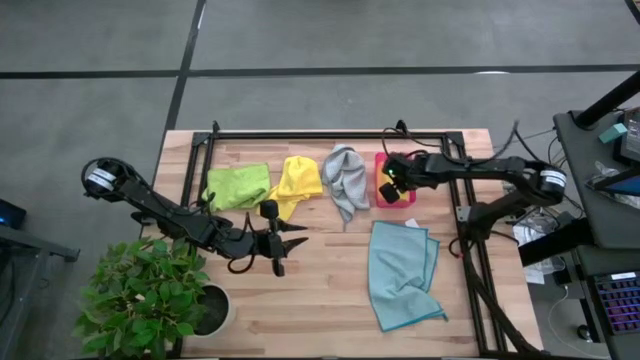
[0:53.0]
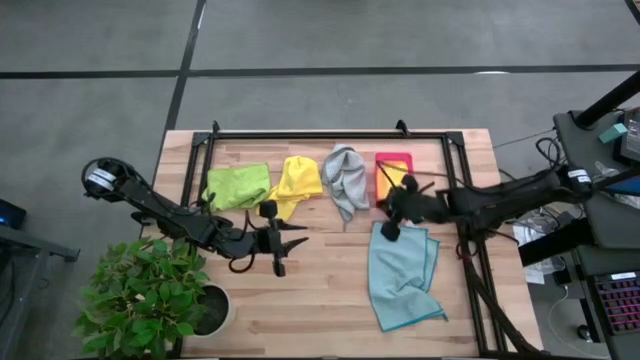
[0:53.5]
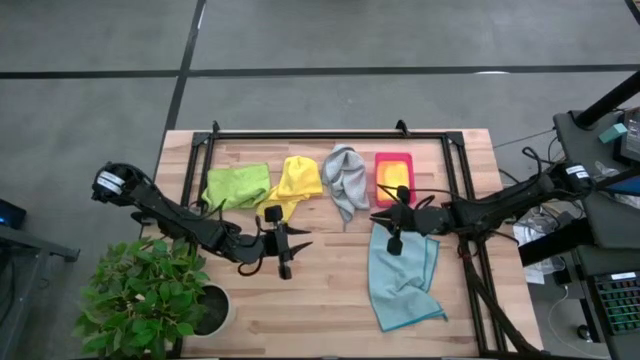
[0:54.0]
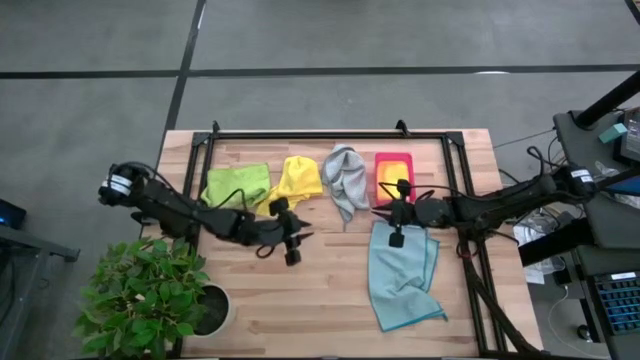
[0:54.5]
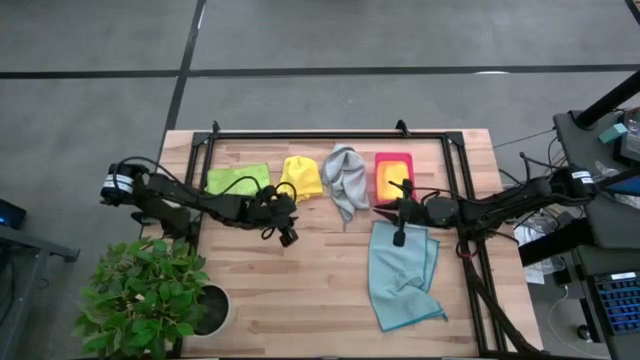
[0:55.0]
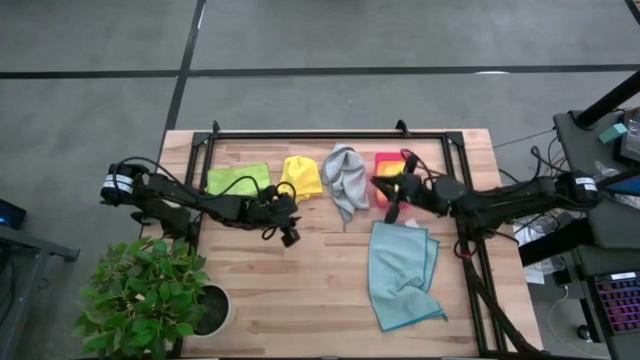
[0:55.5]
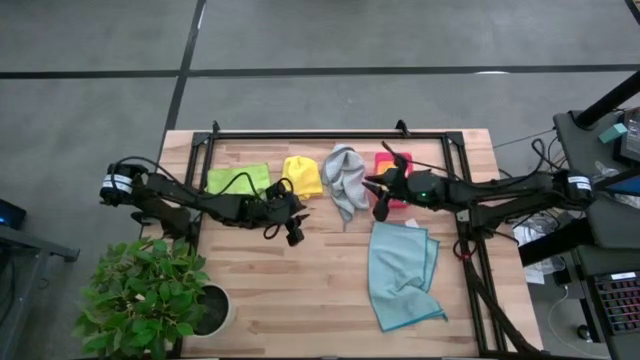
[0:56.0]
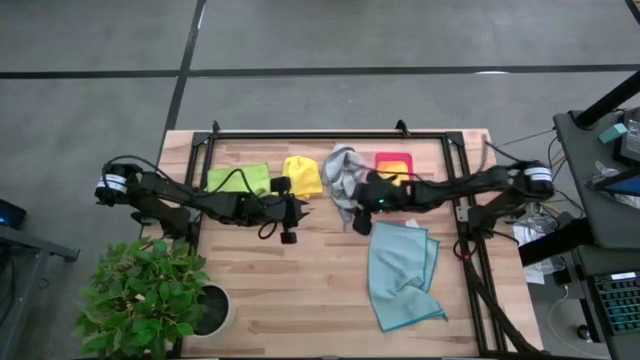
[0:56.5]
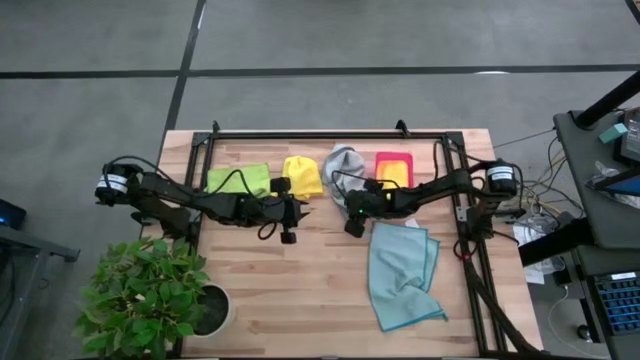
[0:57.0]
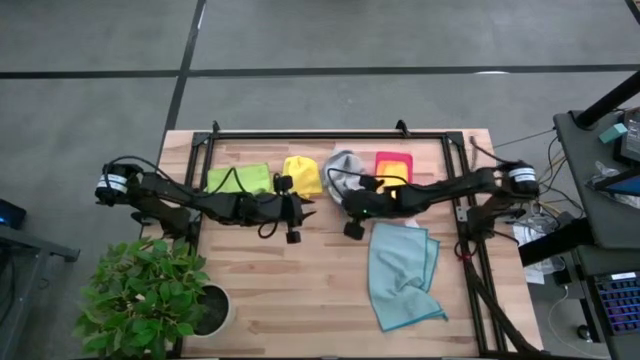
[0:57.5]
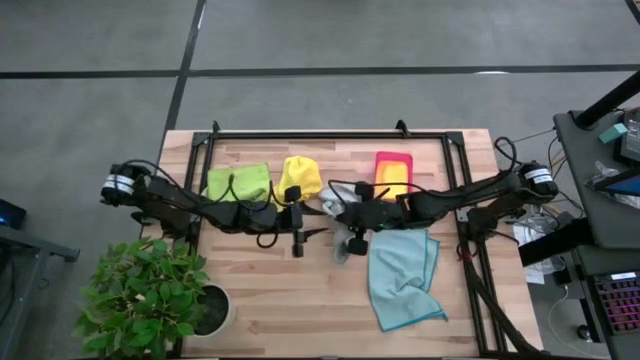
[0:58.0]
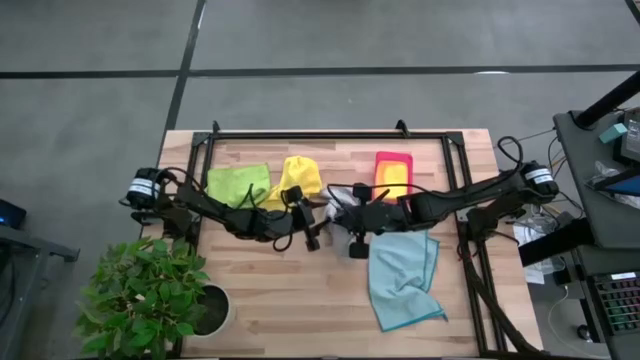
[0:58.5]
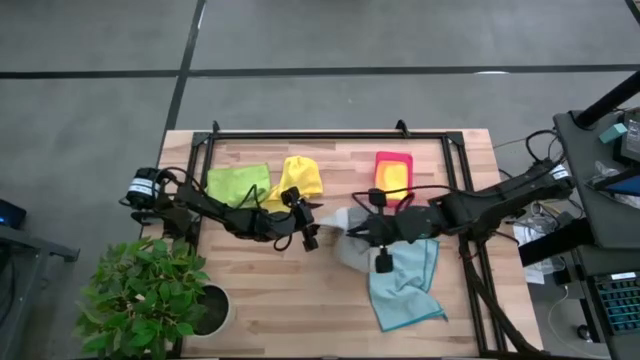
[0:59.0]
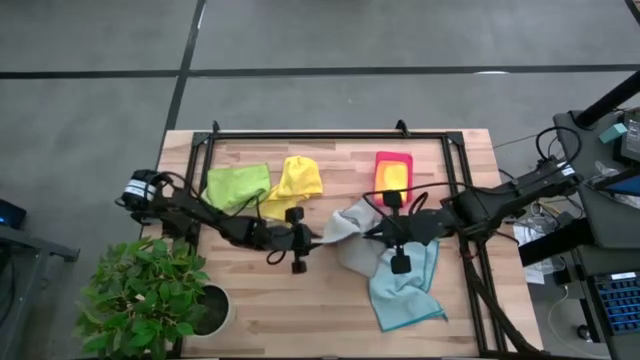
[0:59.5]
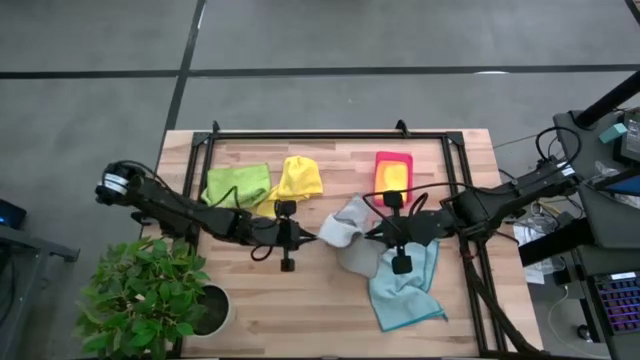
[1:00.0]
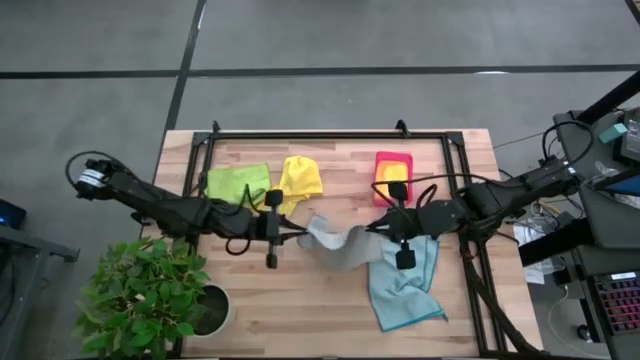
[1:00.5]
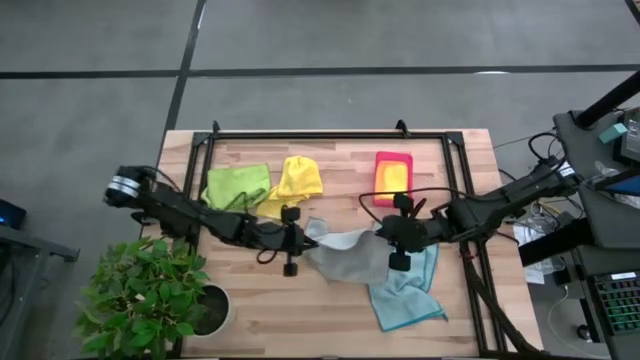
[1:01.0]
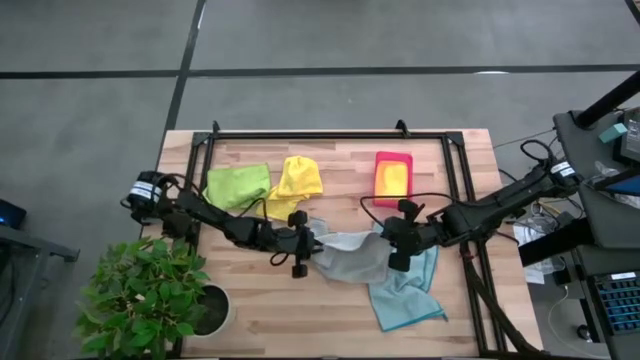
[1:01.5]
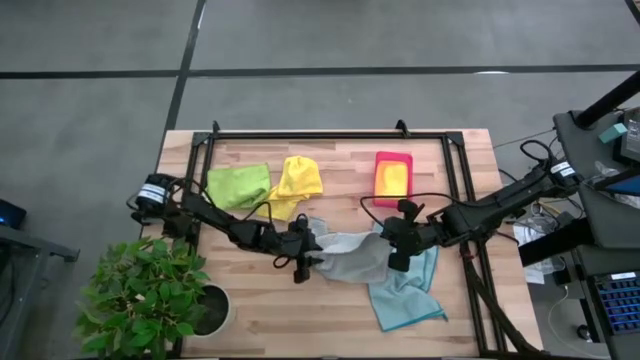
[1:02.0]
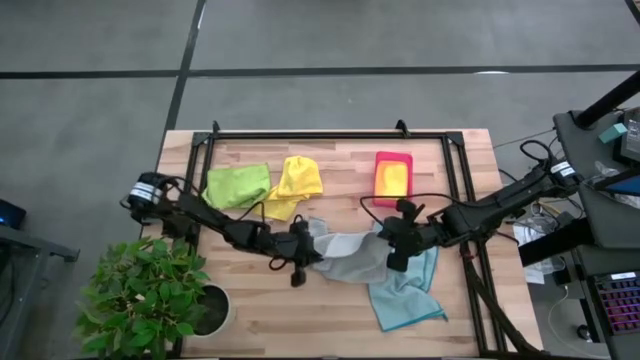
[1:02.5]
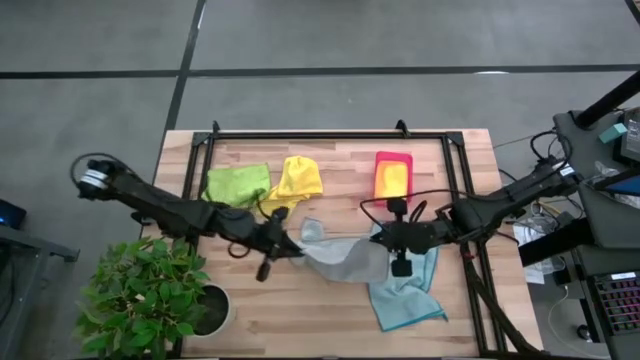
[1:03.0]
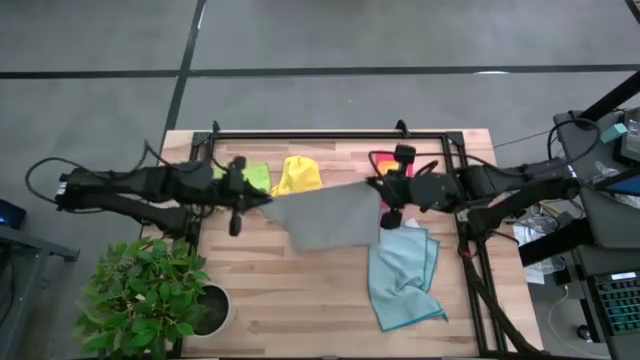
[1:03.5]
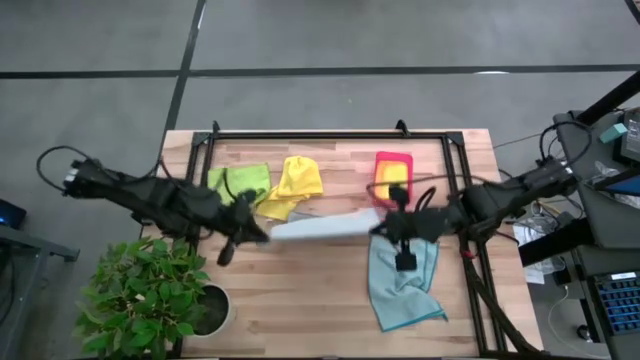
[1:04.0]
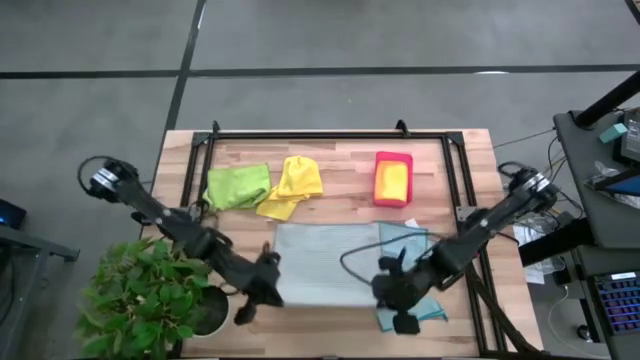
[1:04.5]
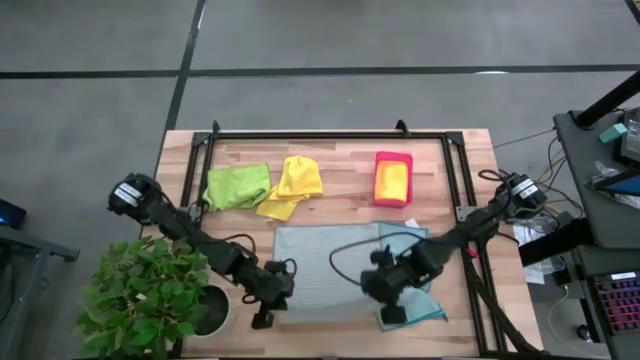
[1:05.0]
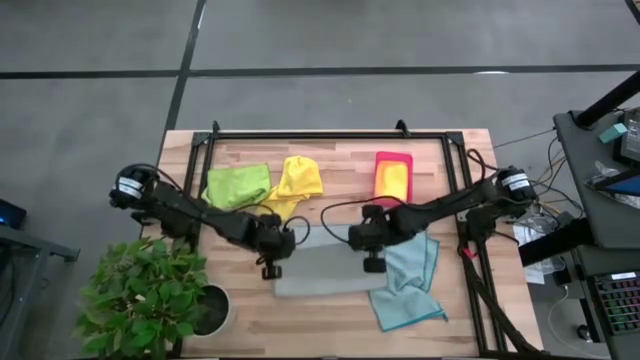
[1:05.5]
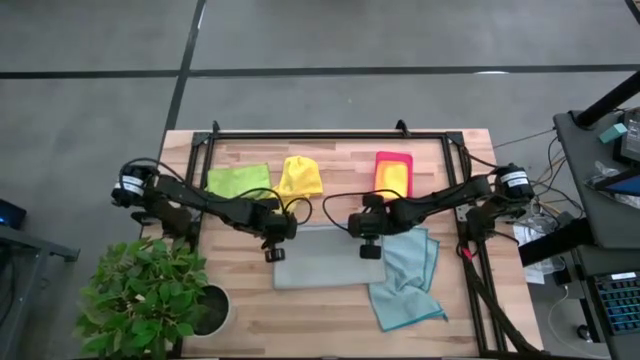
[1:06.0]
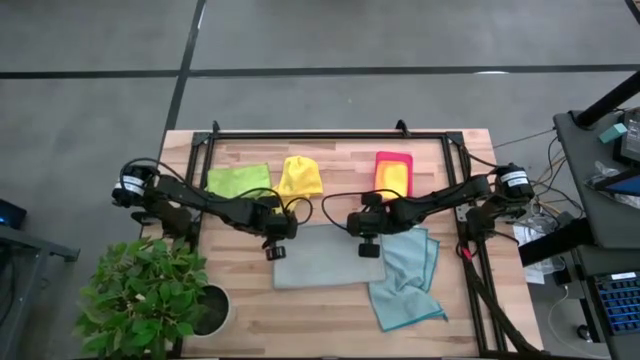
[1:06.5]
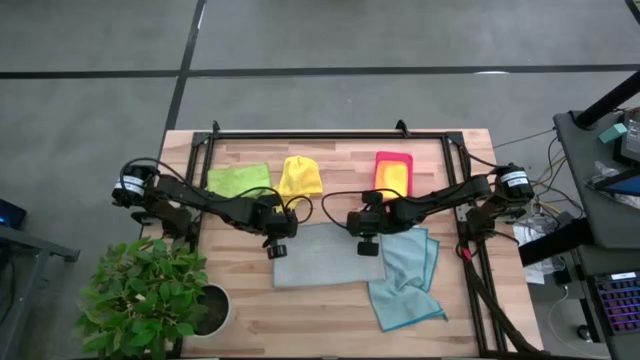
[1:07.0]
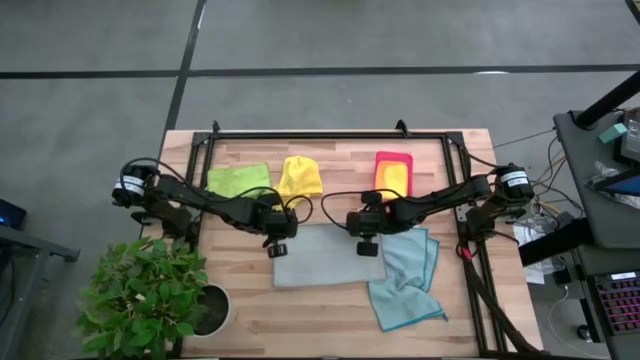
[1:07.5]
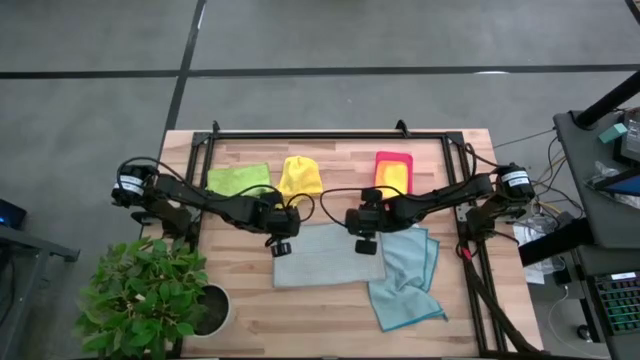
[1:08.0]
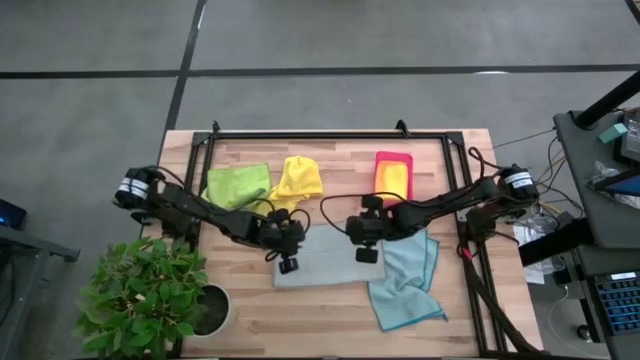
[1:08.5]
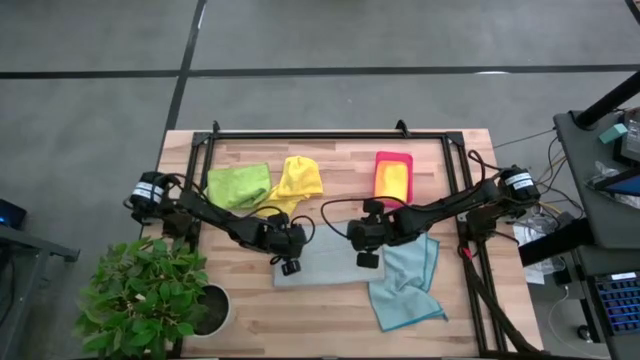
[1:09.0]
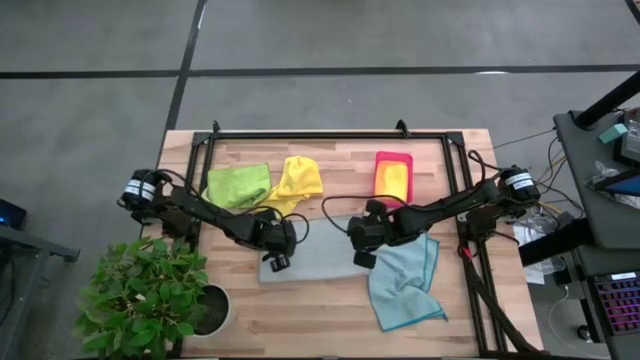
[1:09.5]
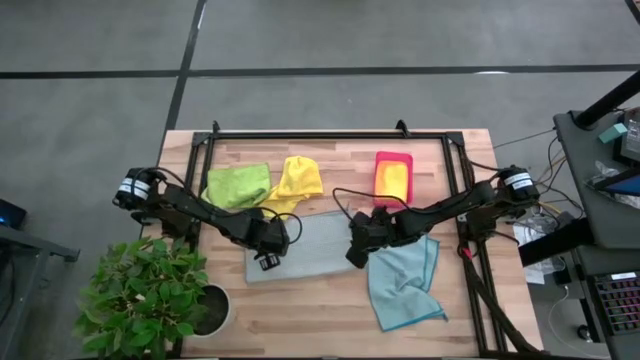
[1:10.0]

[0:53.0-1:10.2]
Task: Fold microfiber towels
Fold the gray microfiber towel

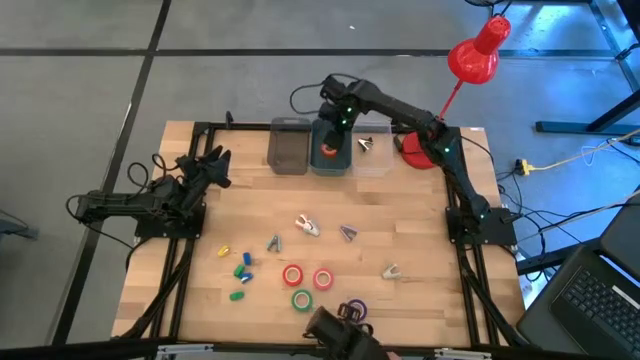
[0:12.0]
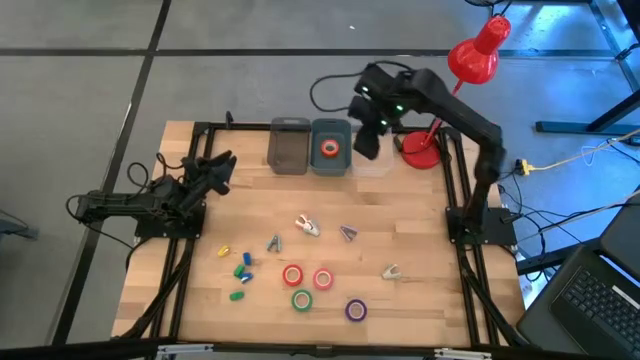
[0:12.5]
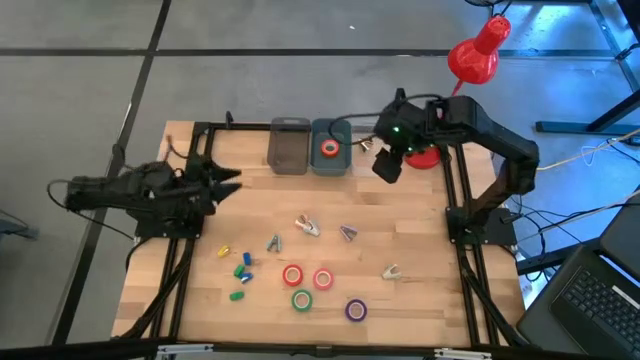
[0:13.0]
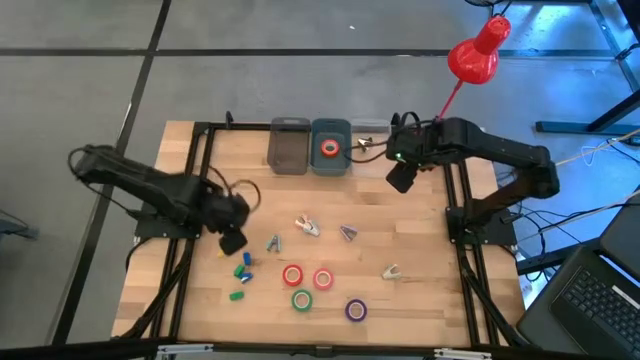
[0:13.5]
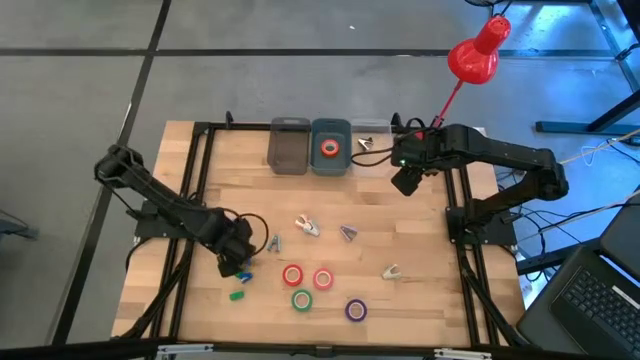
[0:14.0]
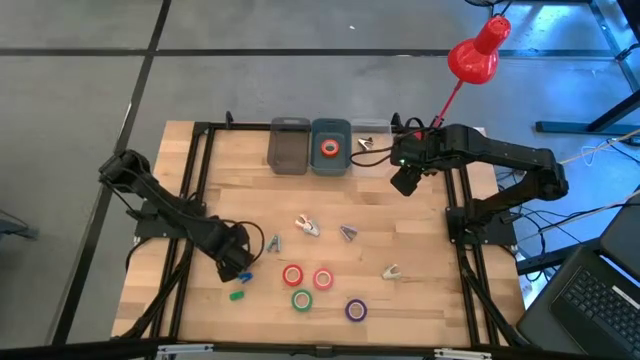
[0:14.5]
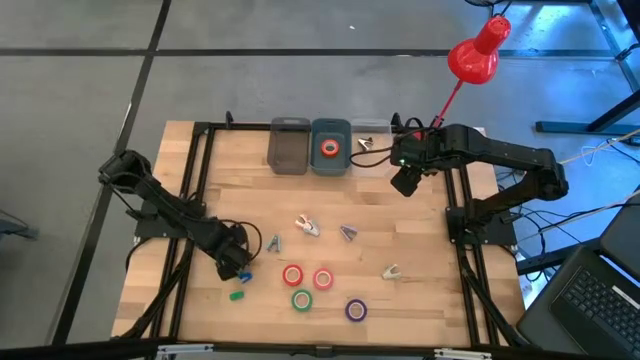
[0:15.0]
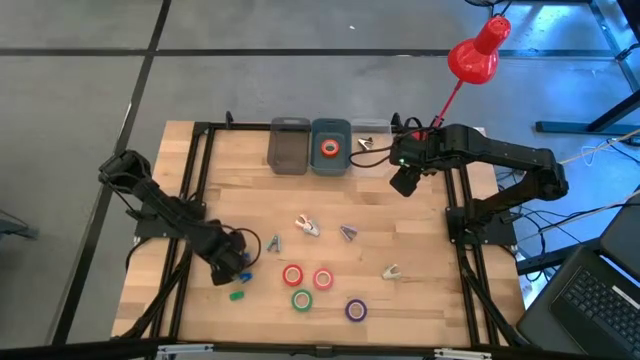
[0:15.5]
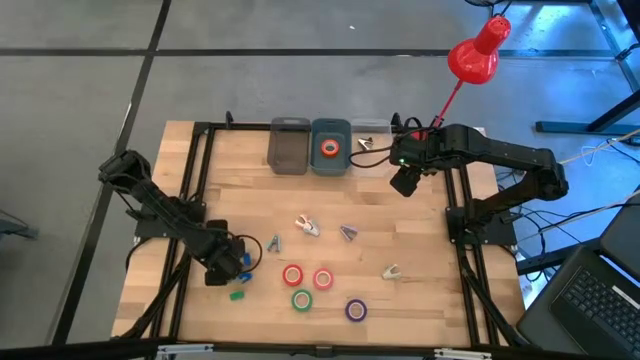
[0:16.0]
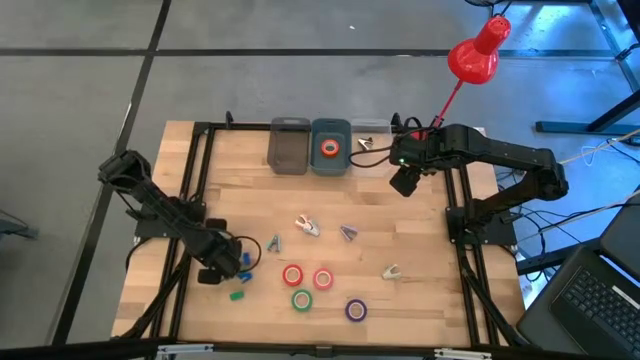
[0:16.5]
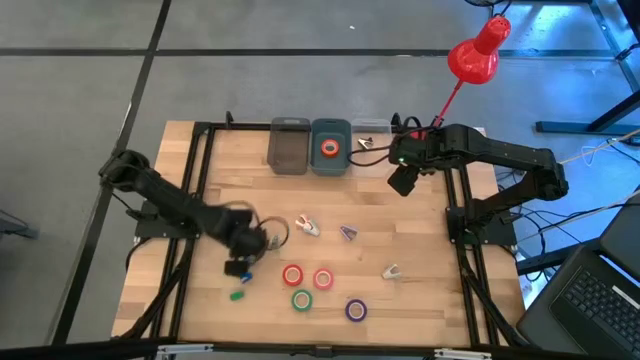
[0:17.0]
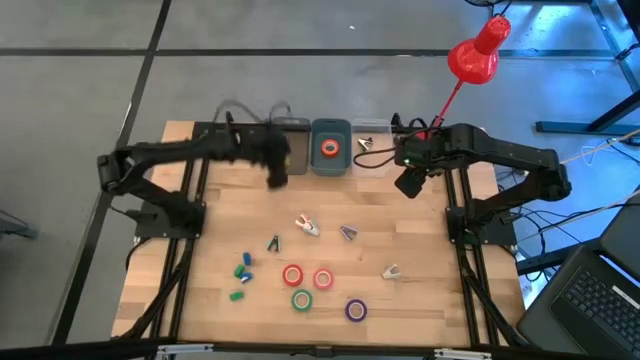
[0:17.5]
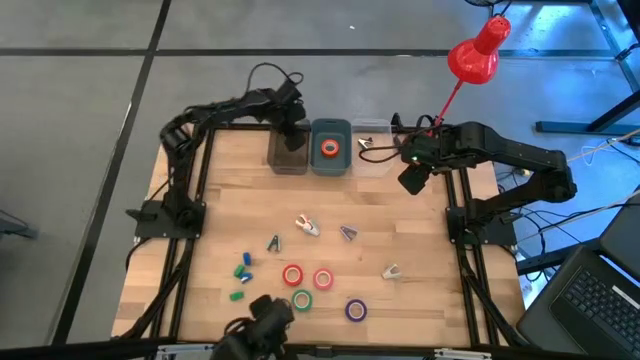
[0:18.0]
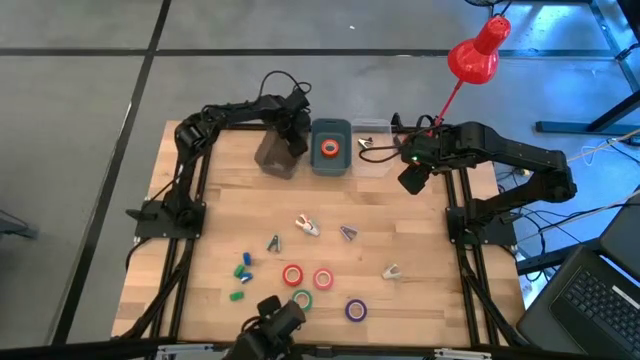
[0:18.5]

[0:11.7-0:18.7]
Task: Pick and place Stapler, Stapler remover, tape
Put the yellow stapler into the black bin
